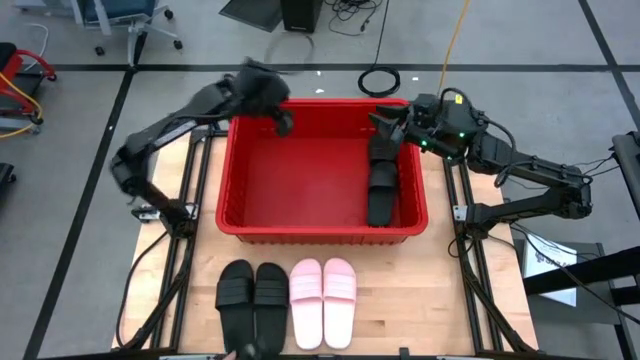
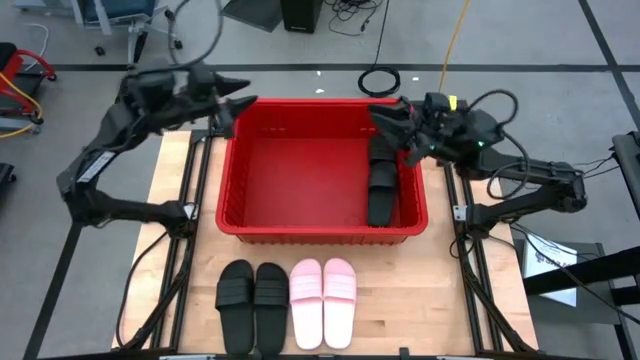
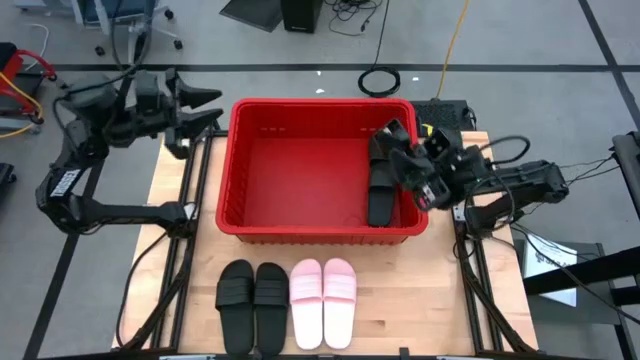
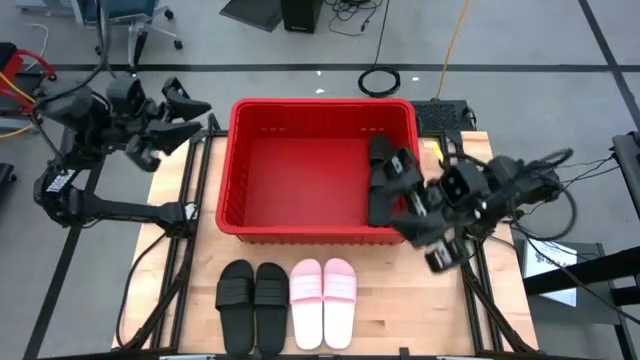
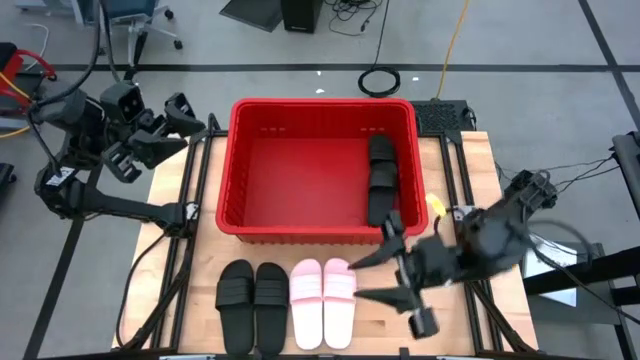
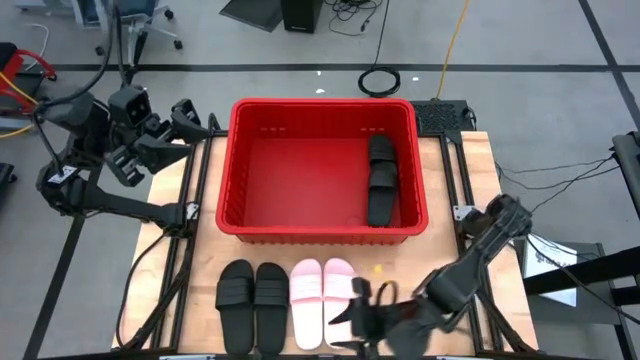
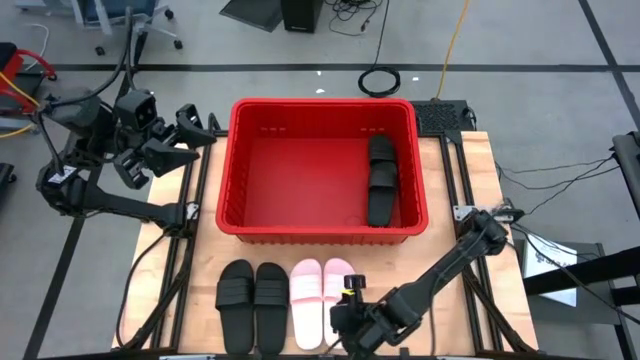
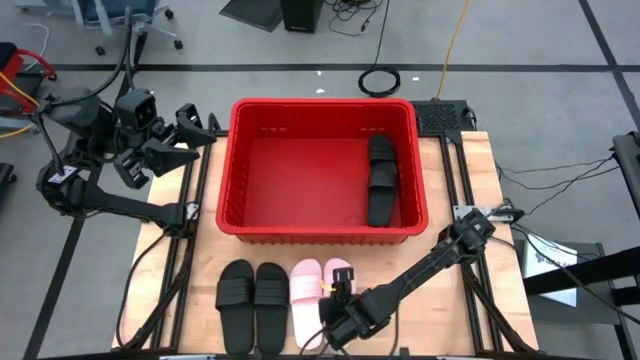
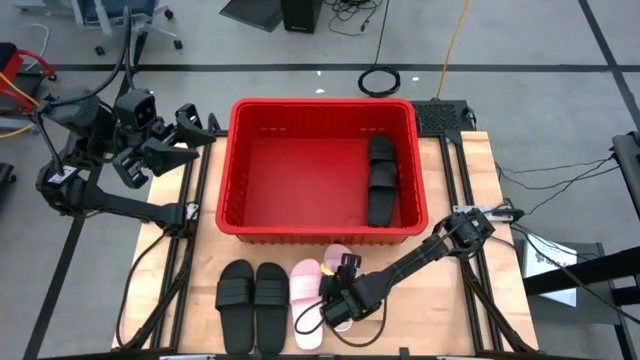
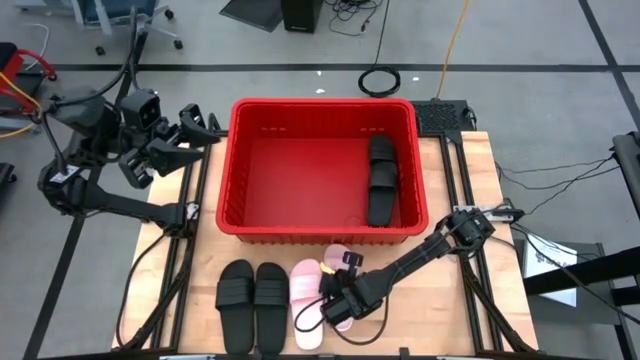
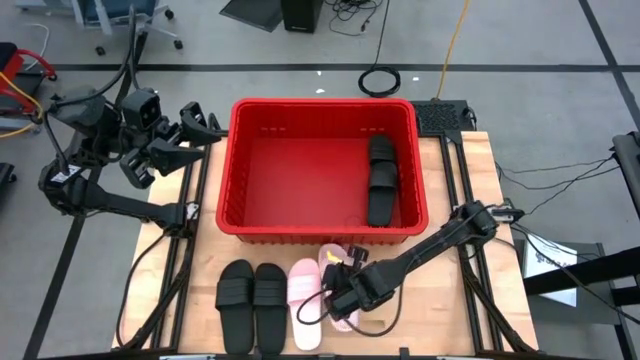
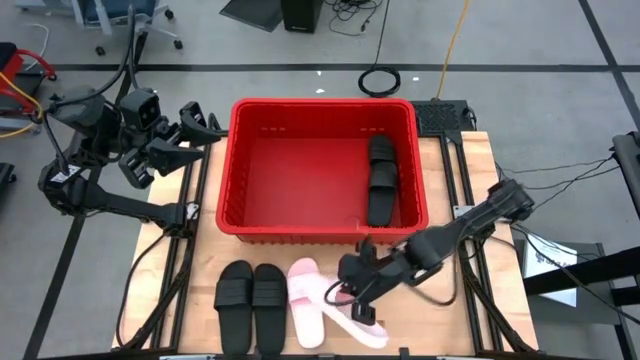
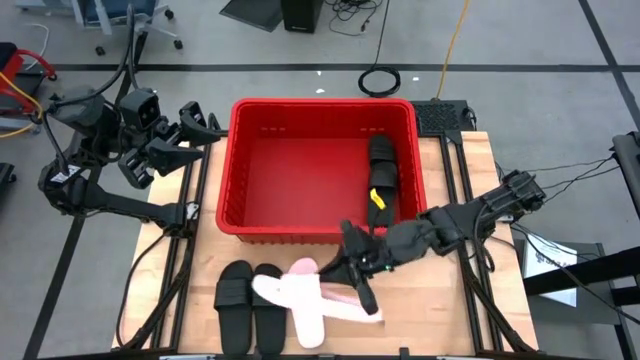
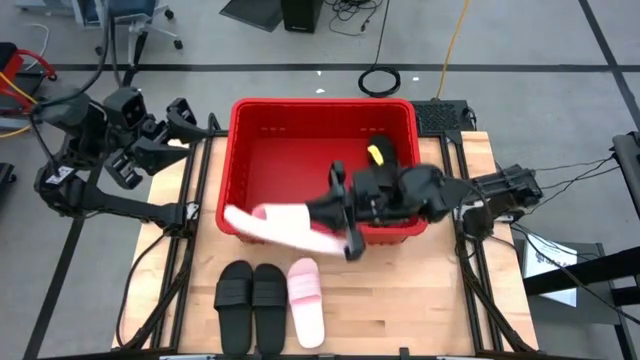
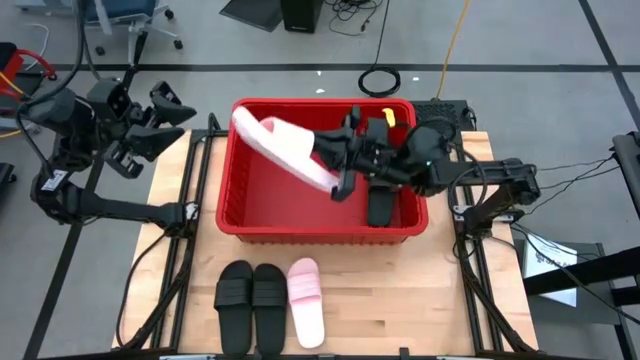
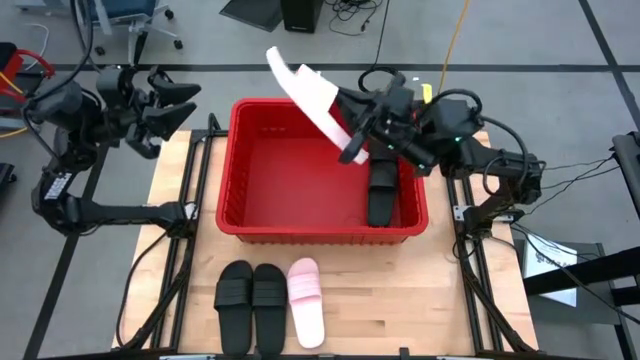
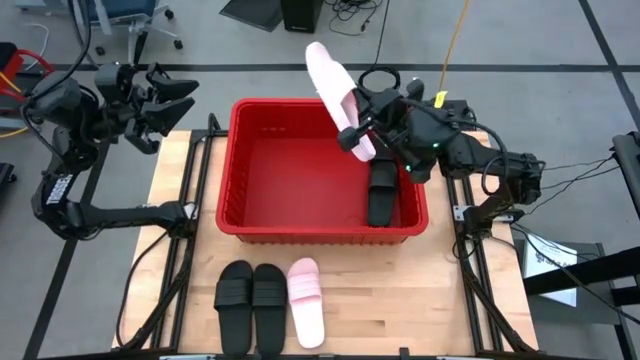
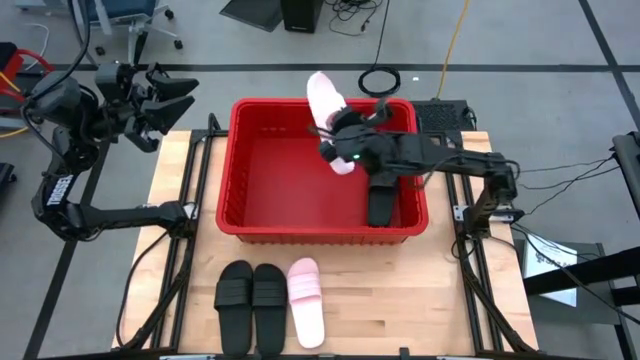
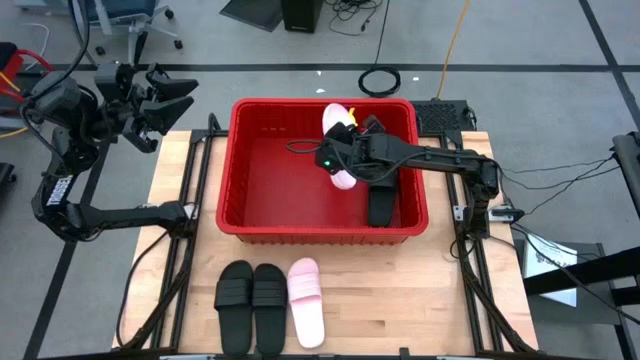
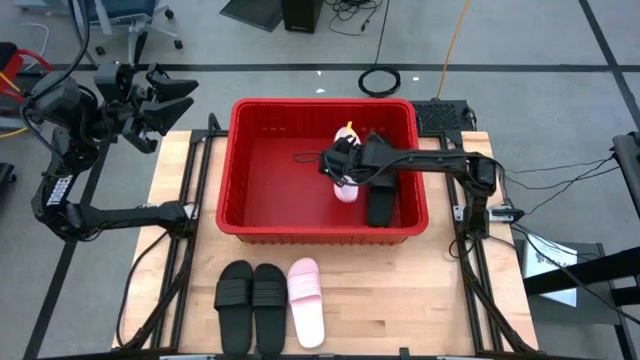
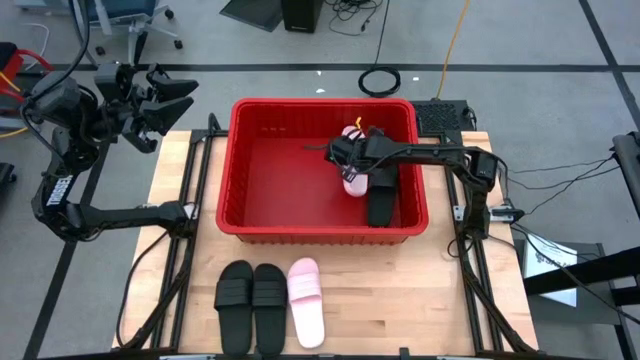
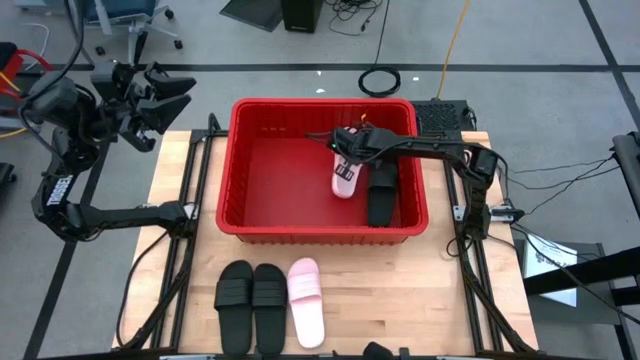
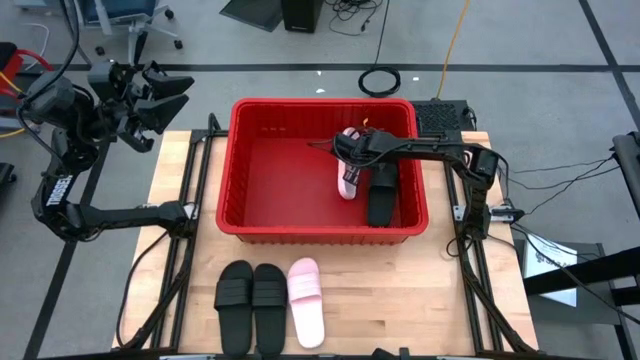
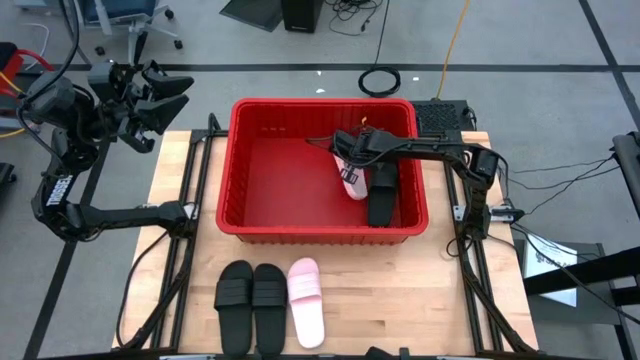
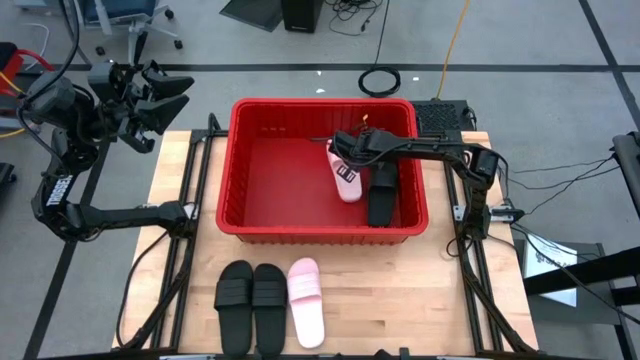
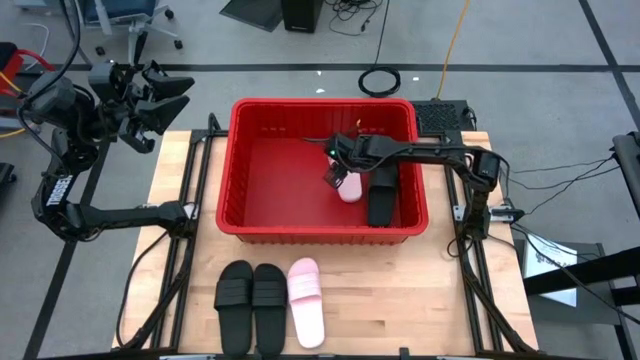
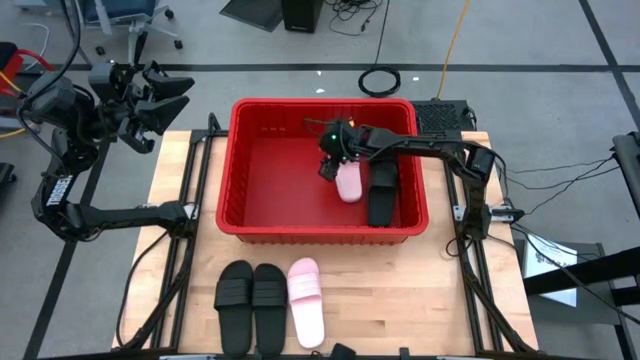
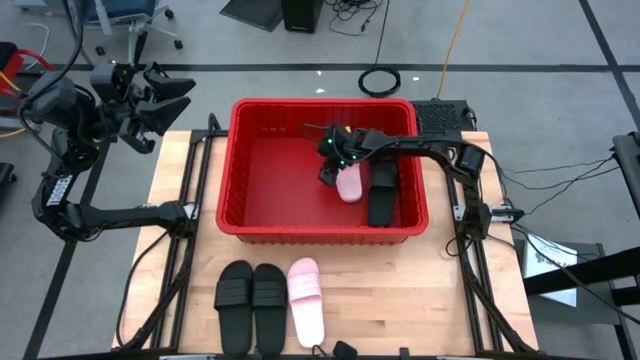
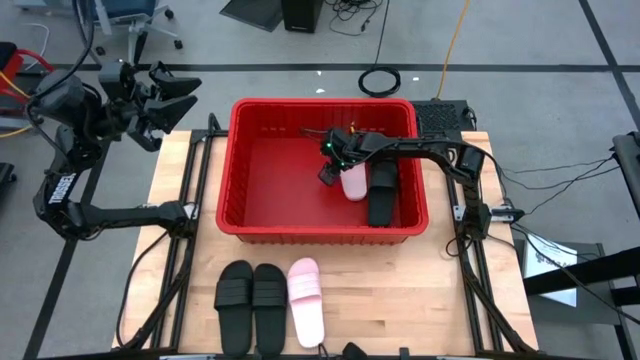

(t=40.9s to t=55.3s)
Task: Pick and place slides into bin
Put the pink slide into the red container

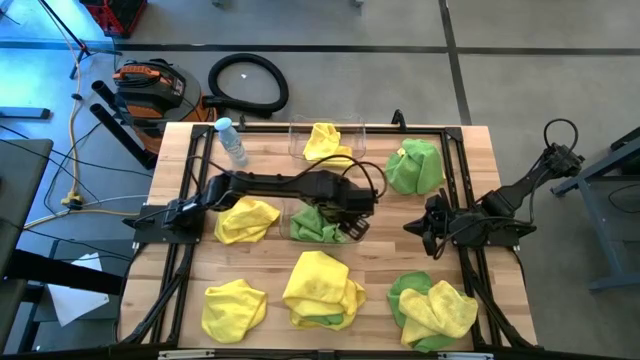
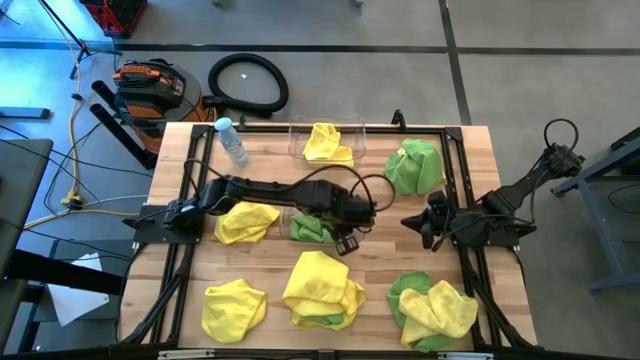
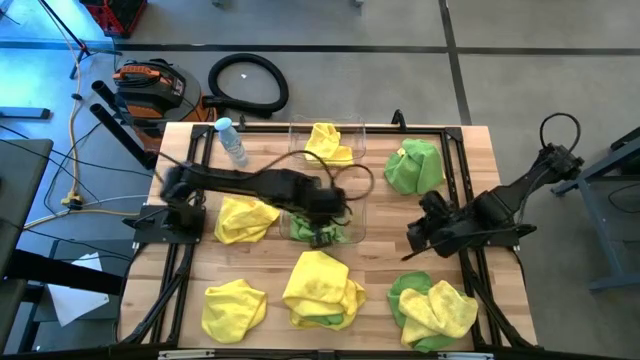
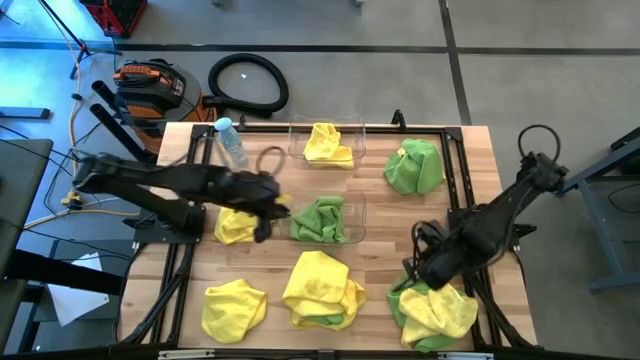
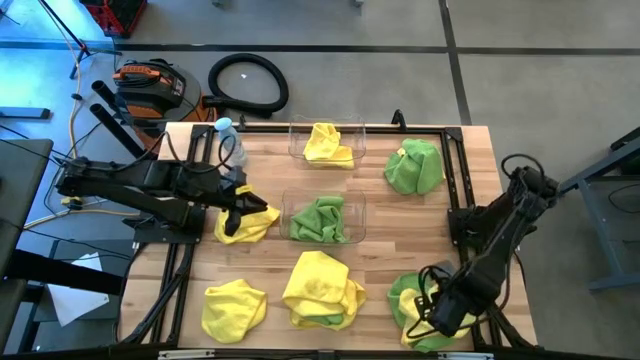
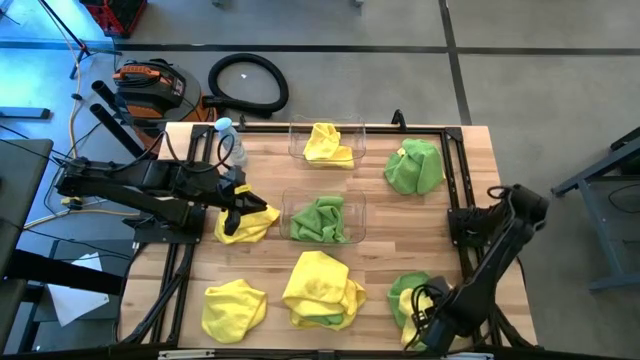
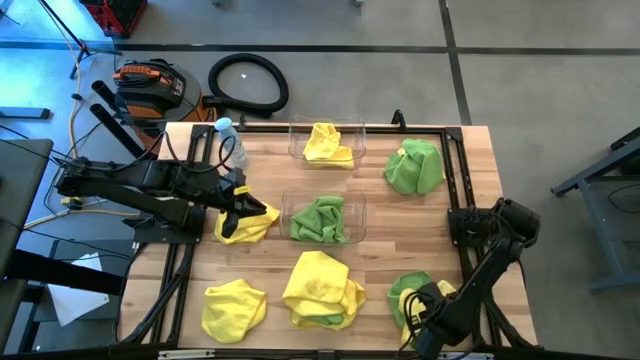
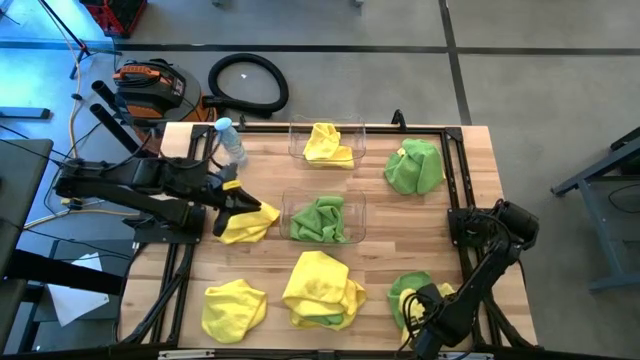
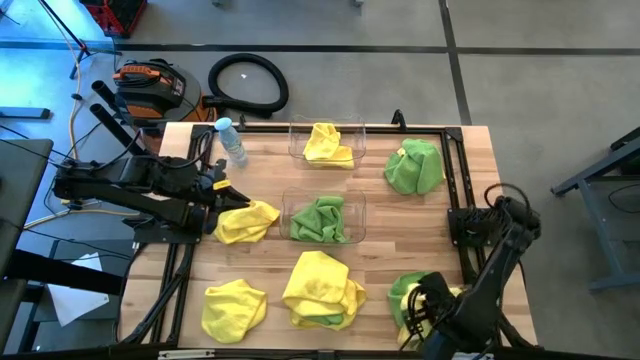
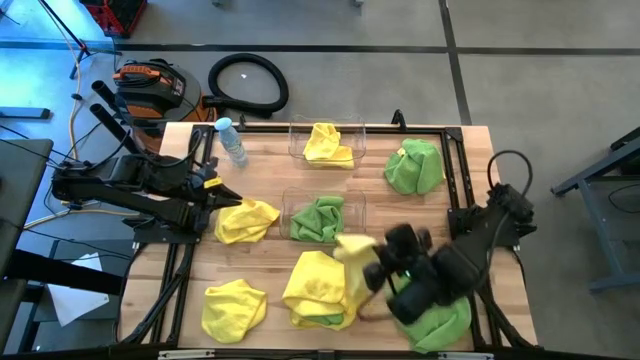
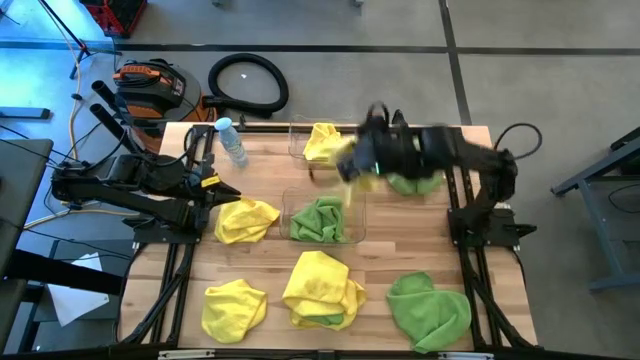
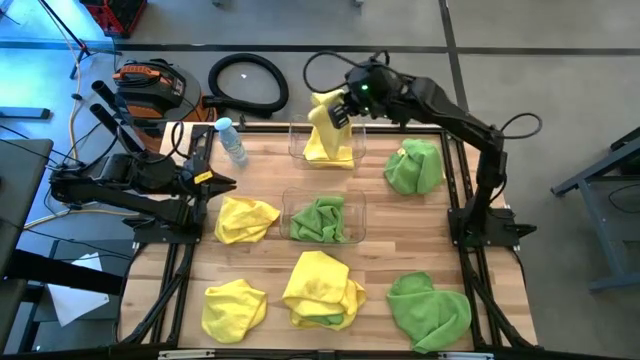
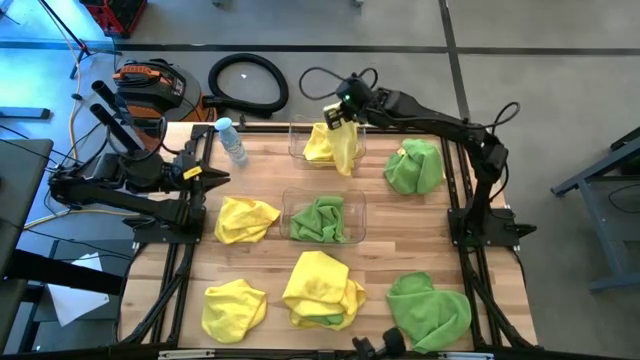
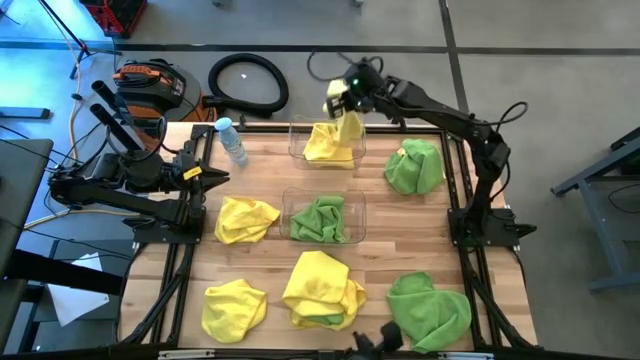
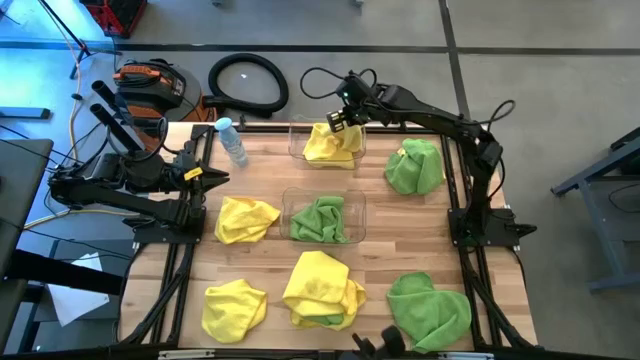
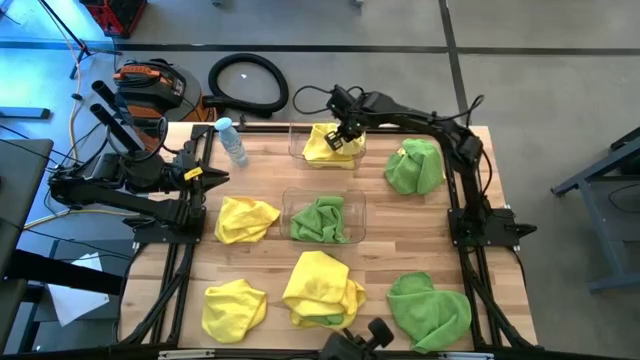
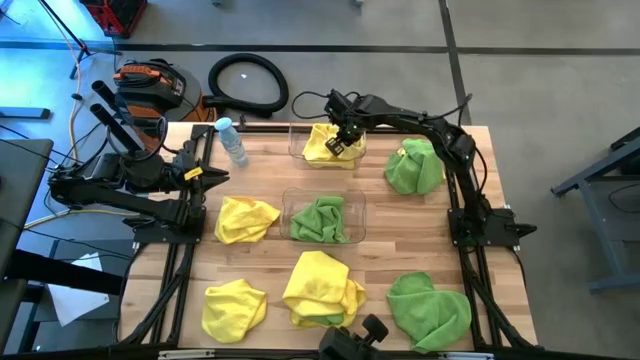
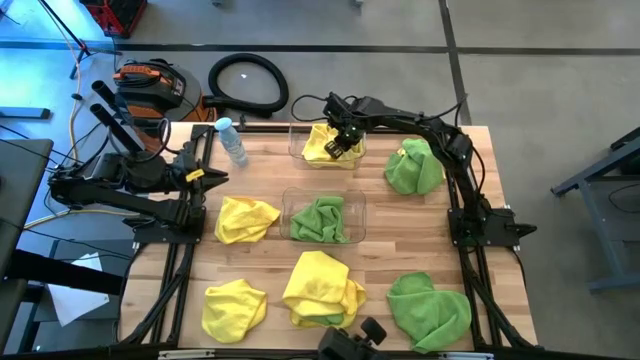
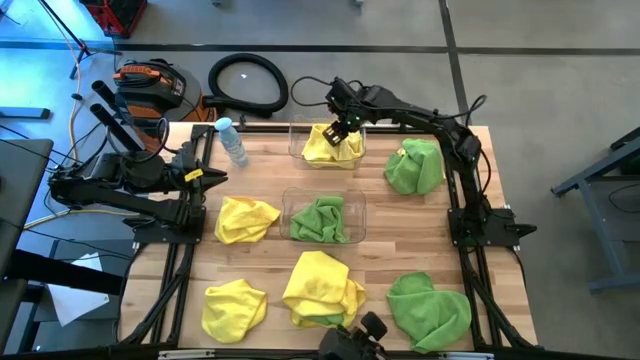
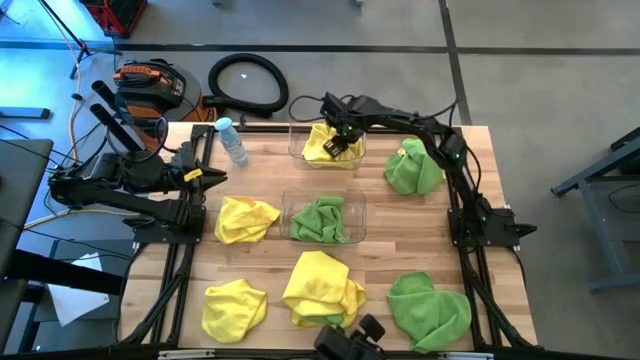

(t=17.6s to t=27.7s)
Task: Sort microfiber towel by color & place in baskets
Put the yellow towel into the top transparent bin
